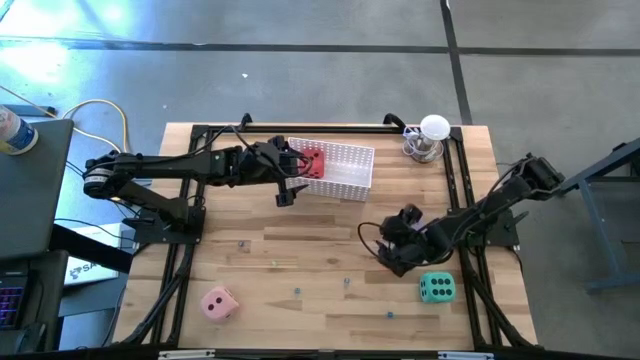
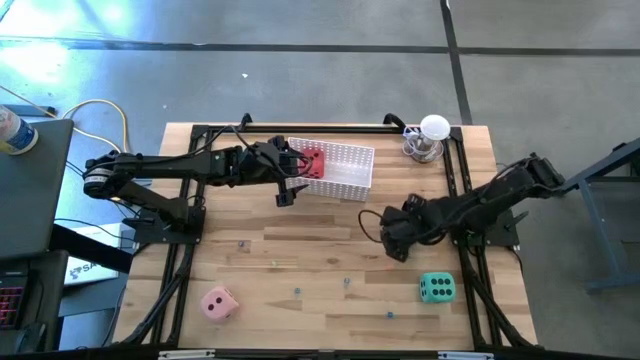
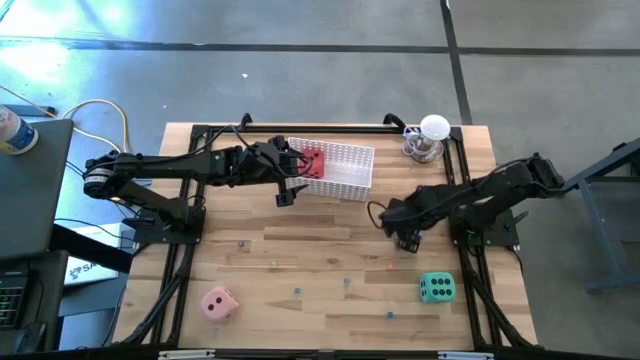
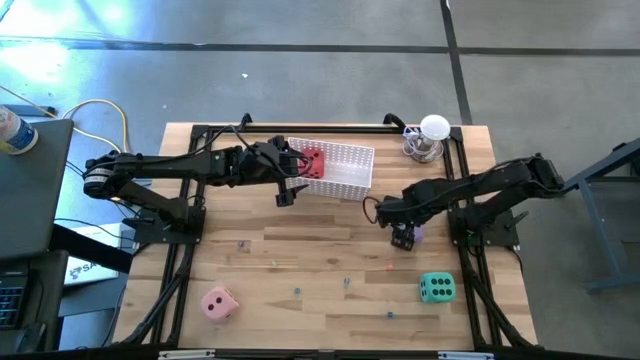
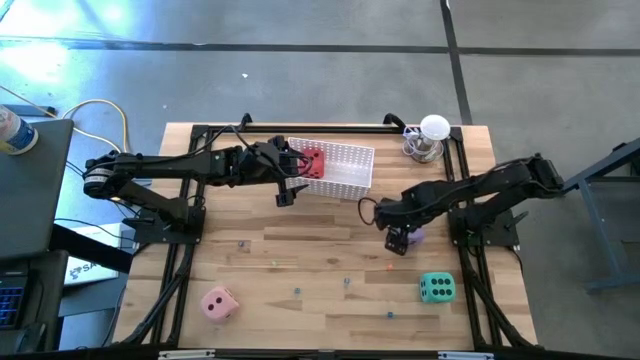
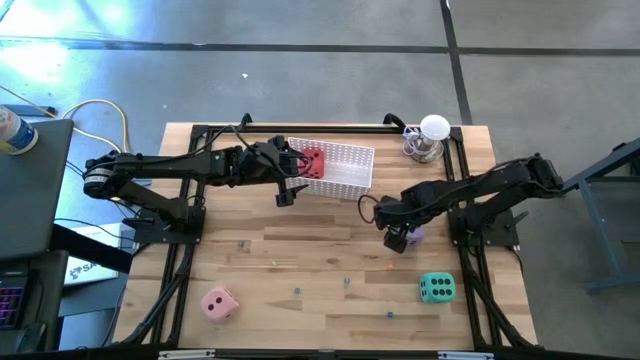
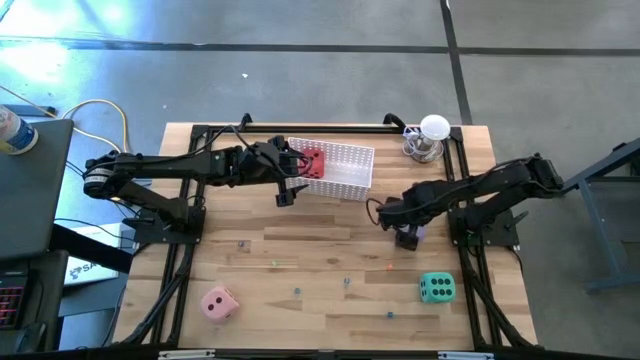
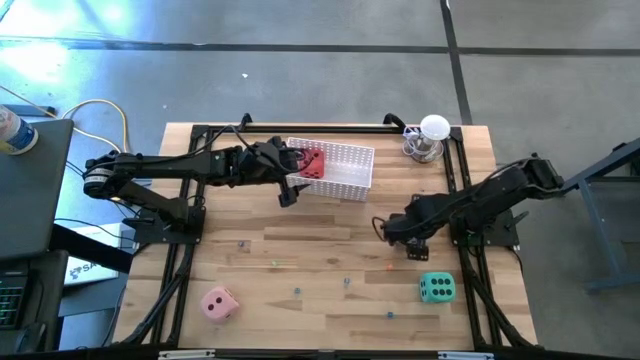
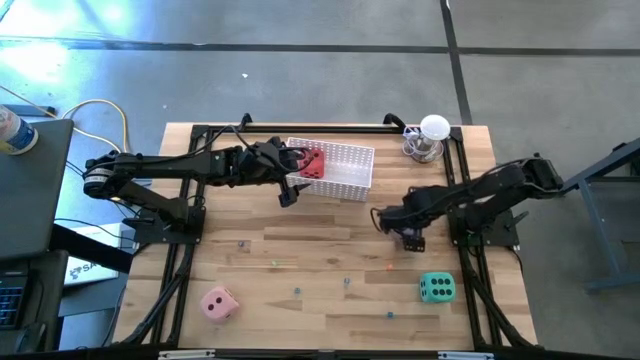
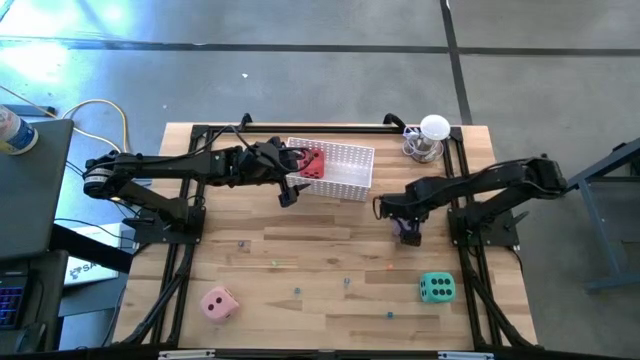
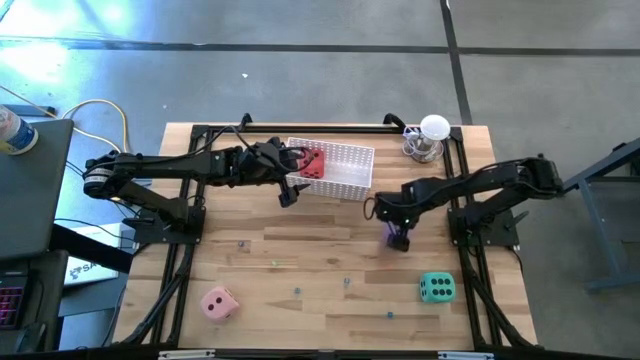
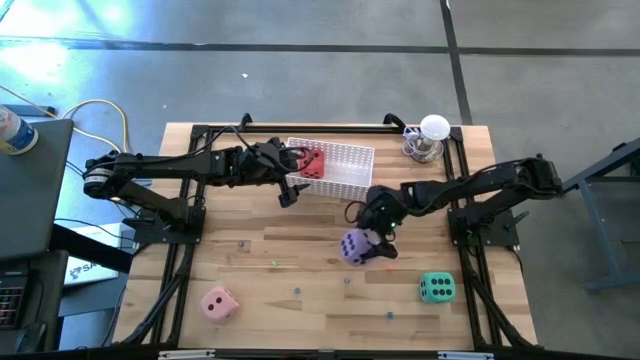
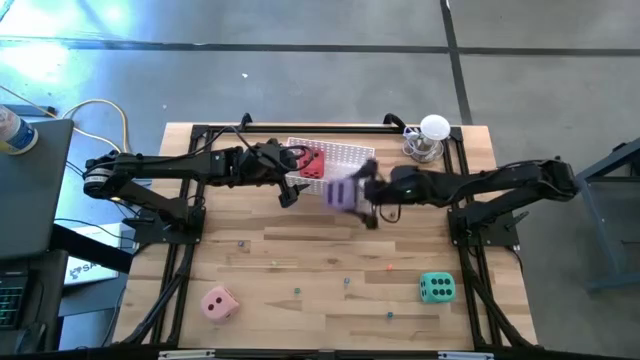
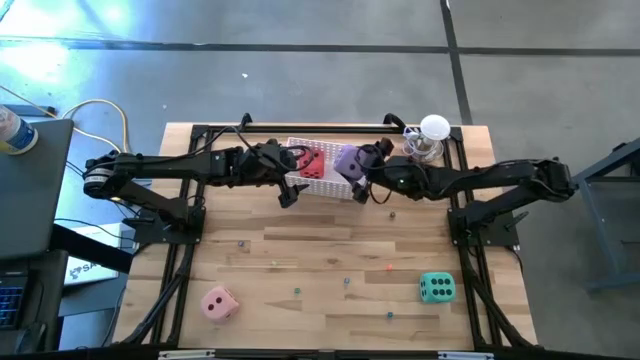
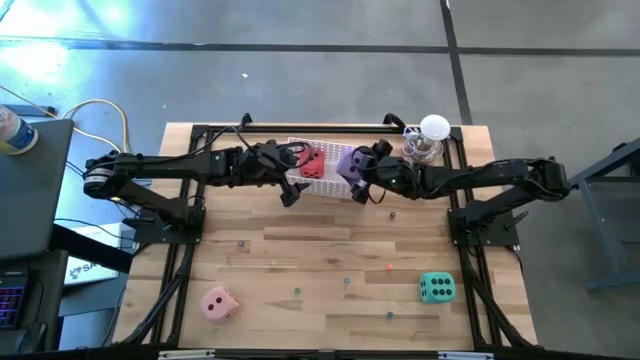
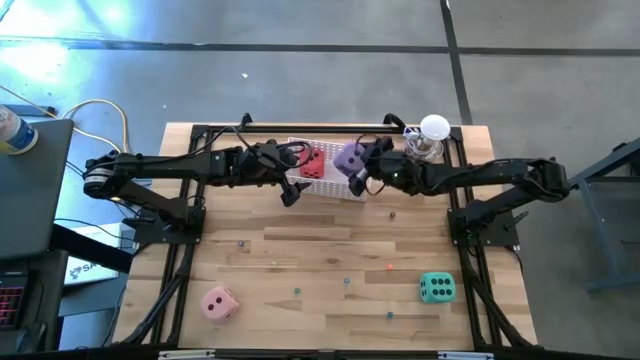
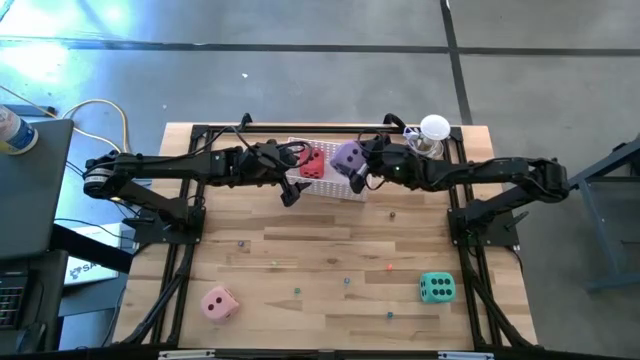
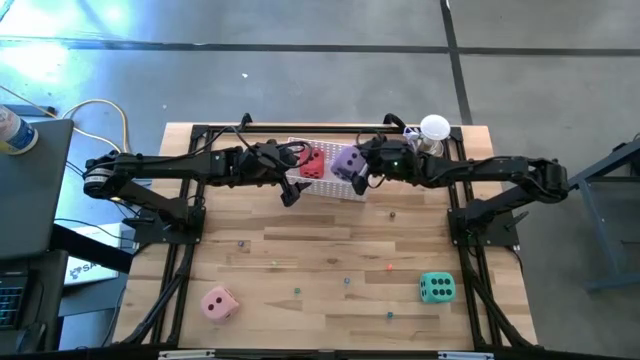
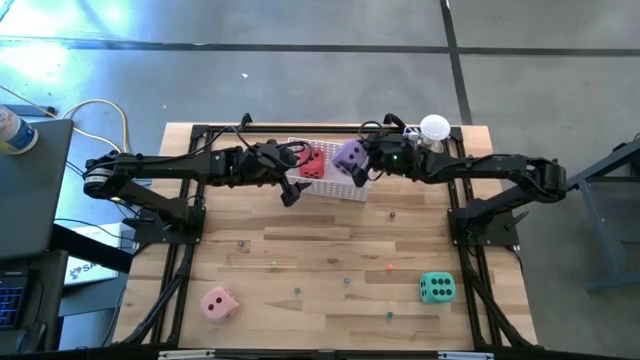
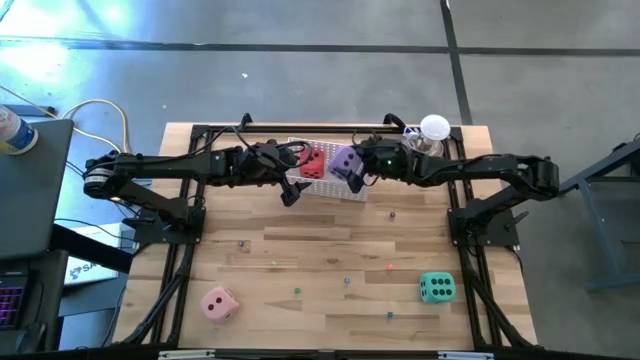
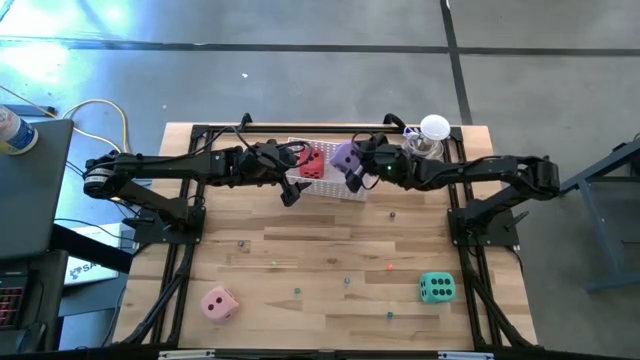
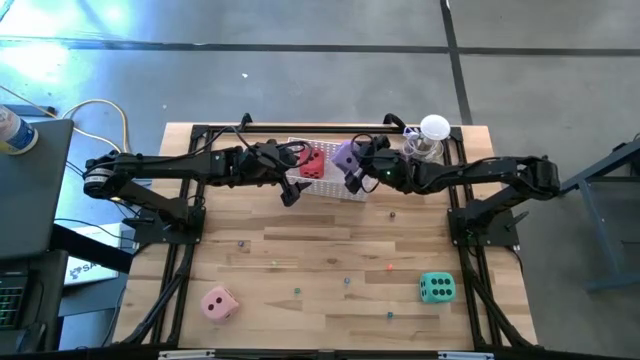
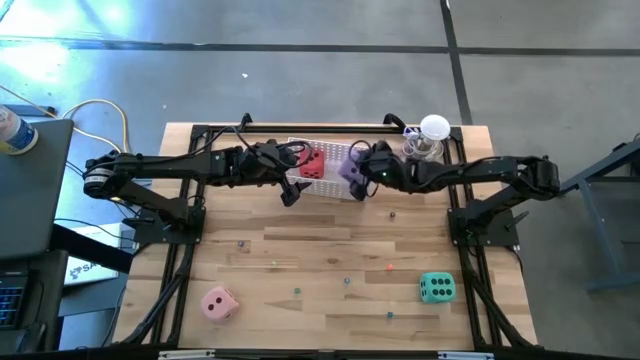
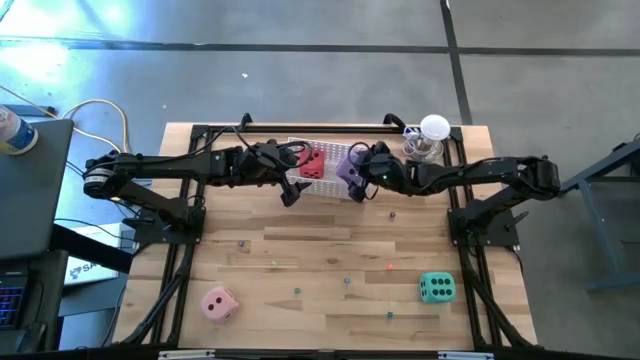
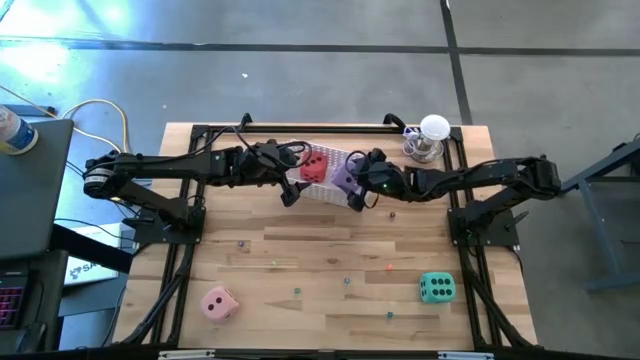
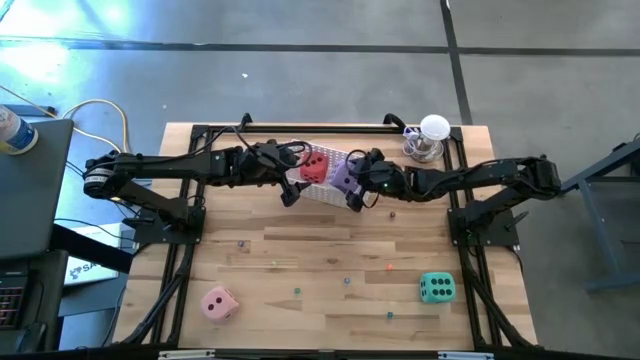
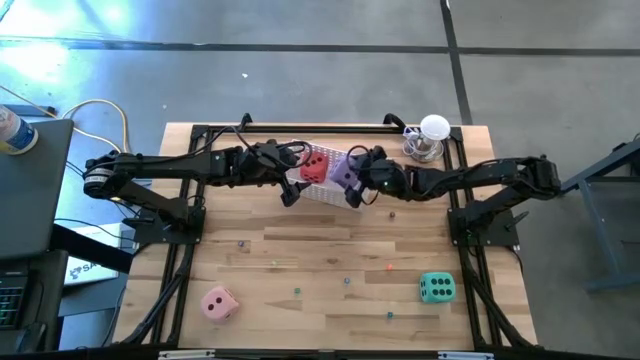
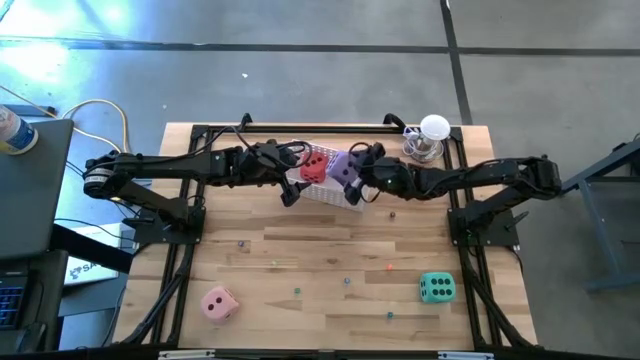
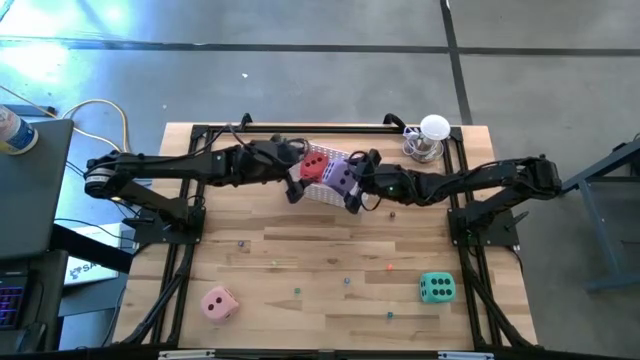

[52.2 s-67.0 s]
Task: Pick & Place Dice
Put the big violet die into the white bin

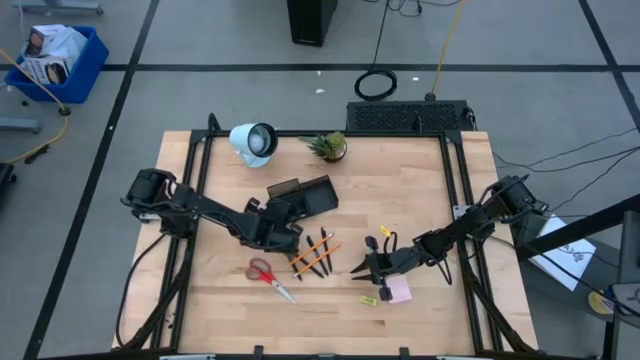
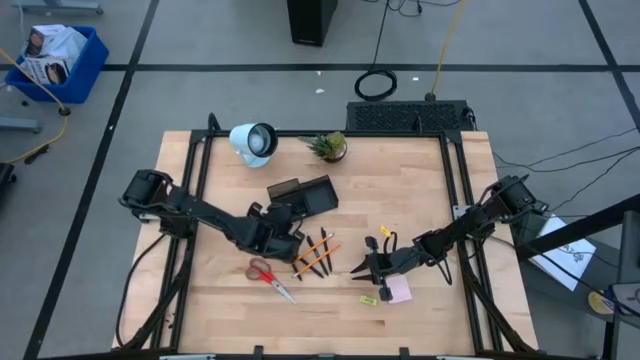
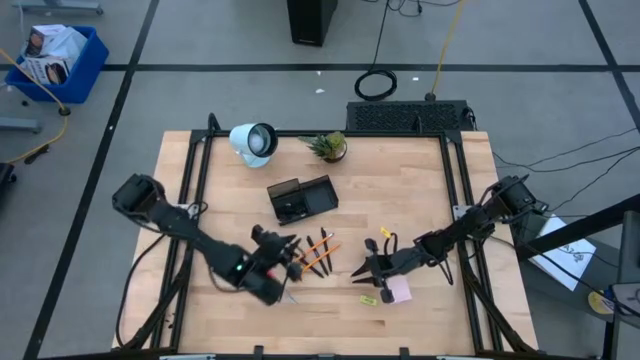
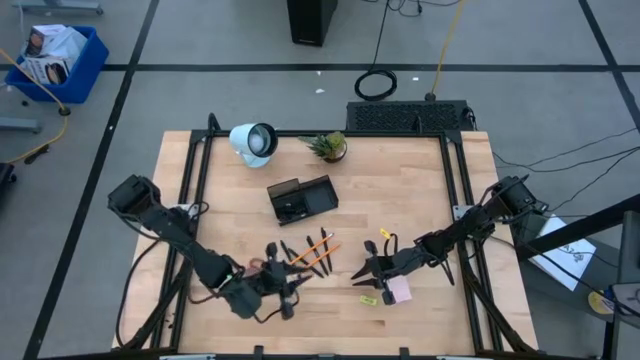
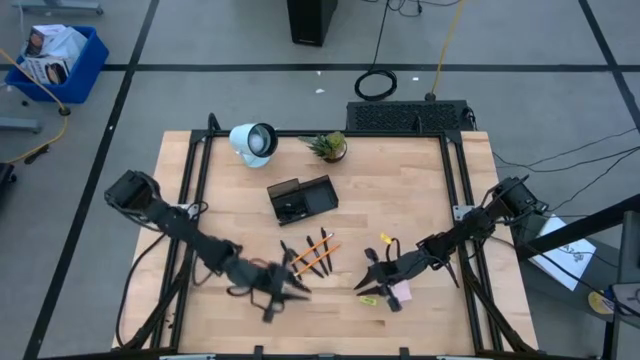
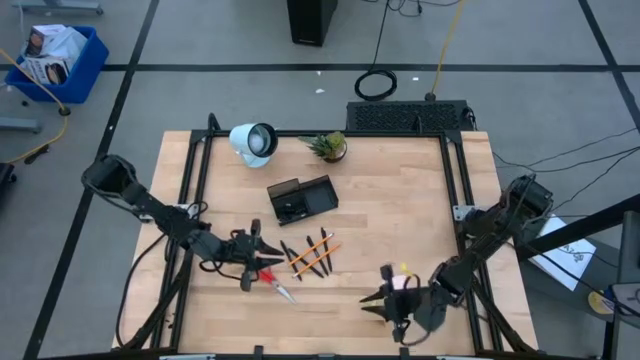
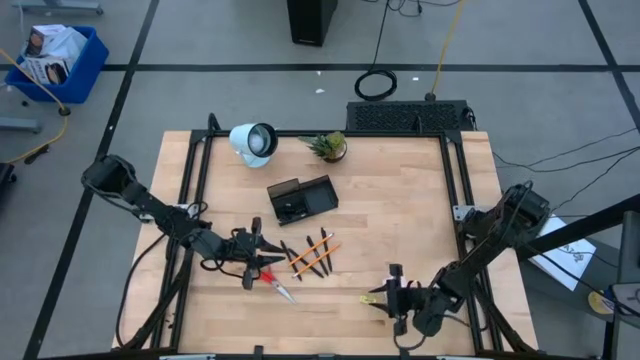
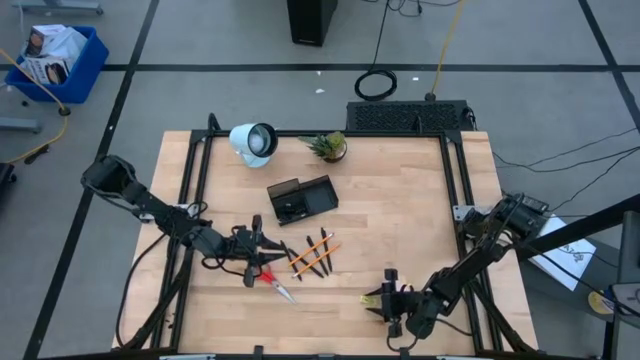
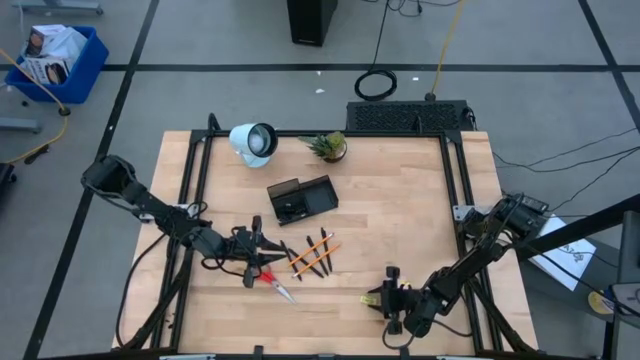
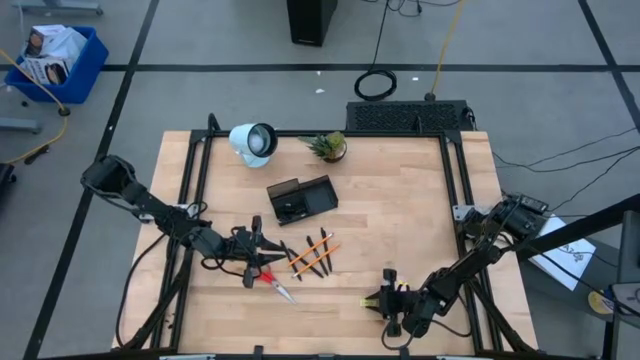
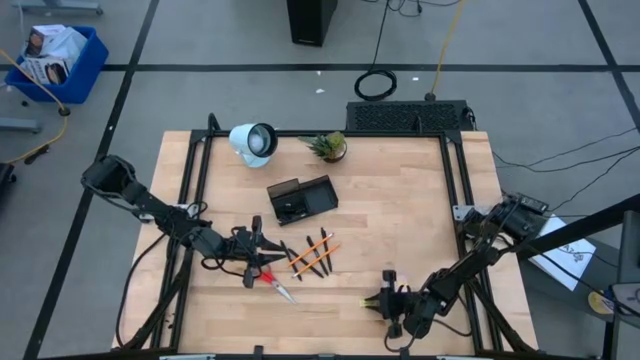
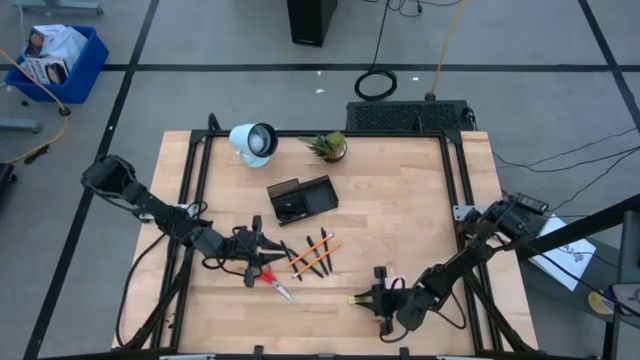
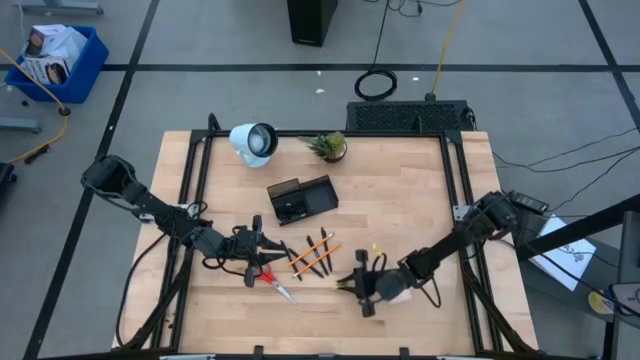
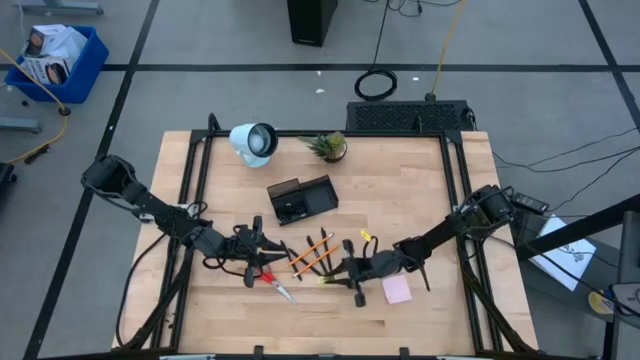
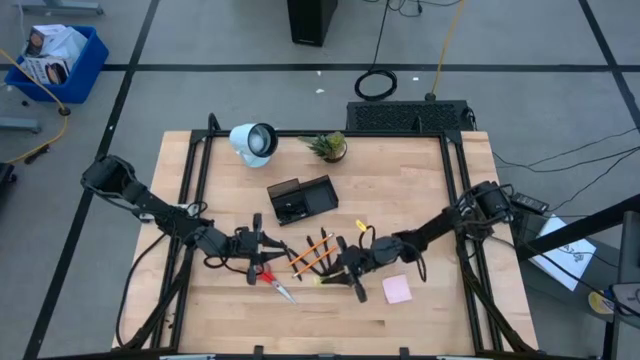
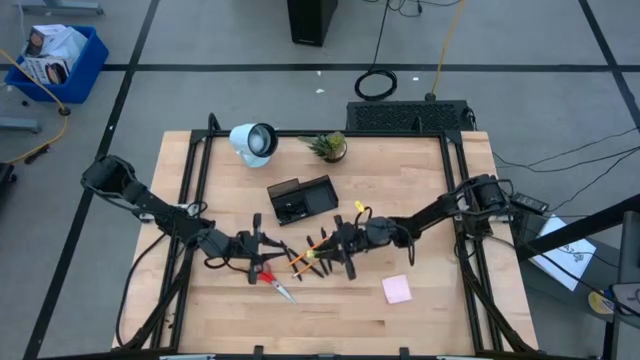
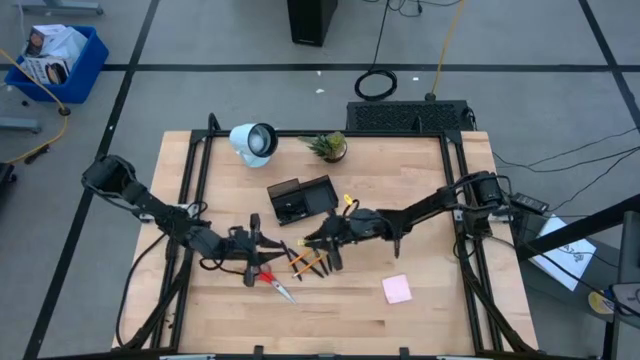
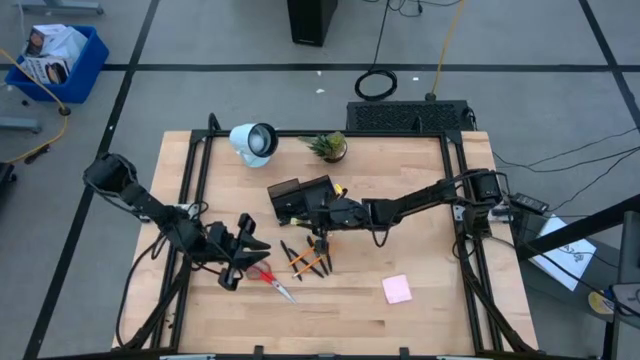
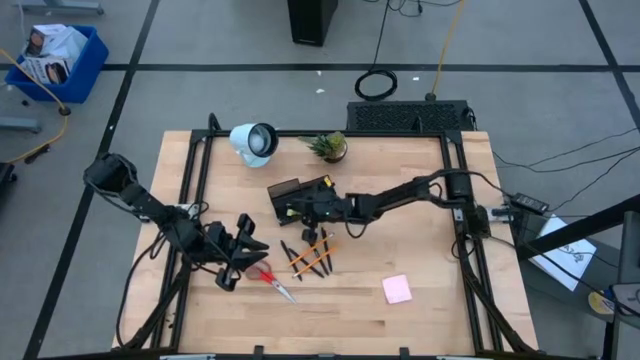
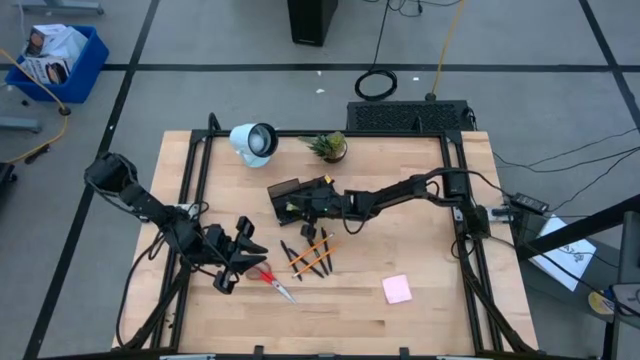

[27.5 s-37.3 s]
Task: Pick and place office supplies into organizer
Put the yellow eraser into the black desk organizer
